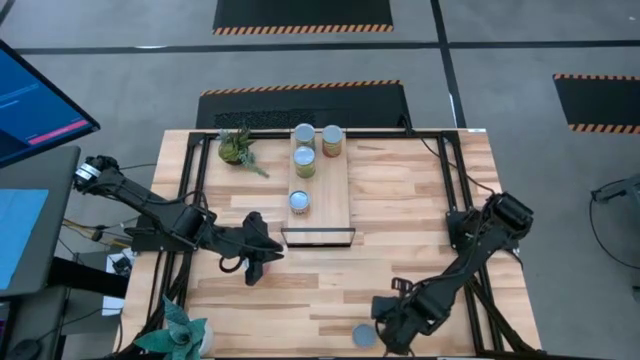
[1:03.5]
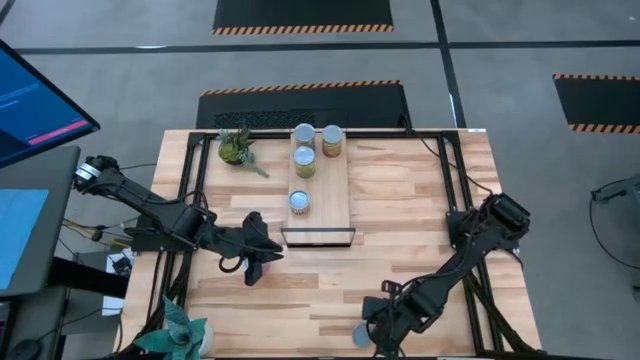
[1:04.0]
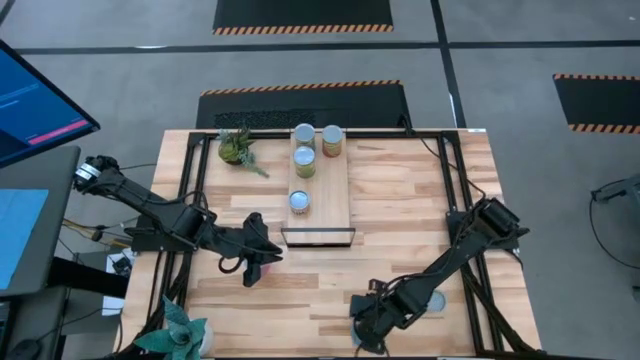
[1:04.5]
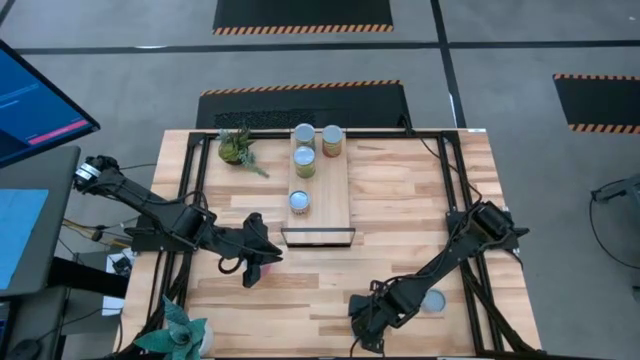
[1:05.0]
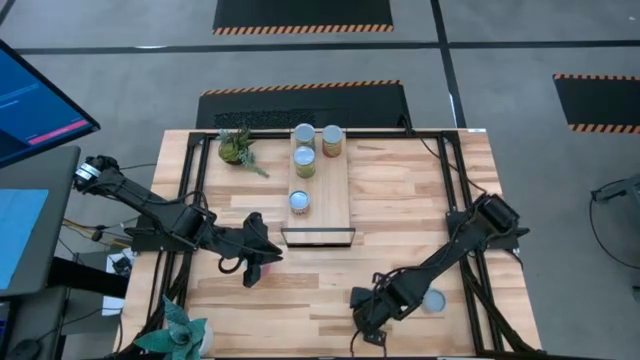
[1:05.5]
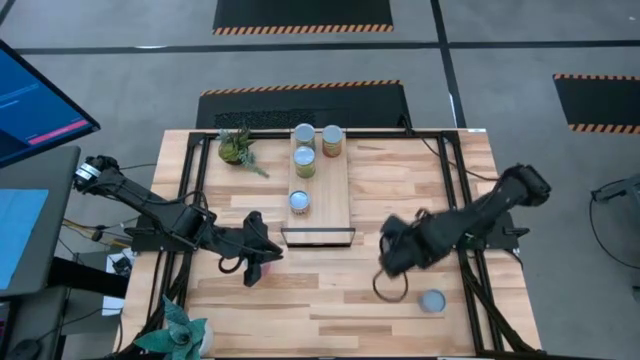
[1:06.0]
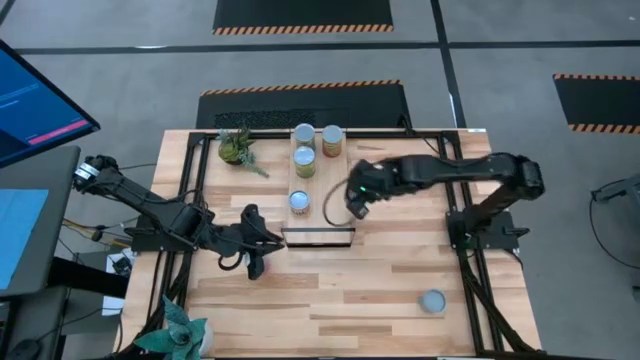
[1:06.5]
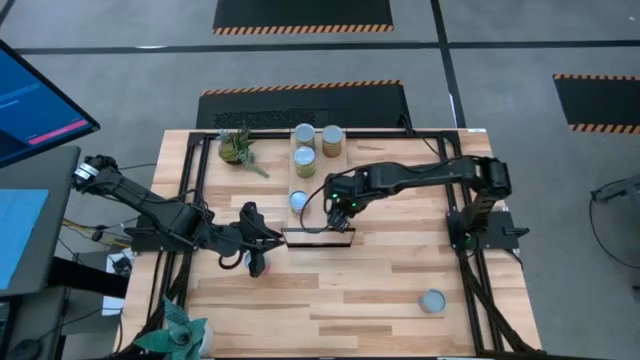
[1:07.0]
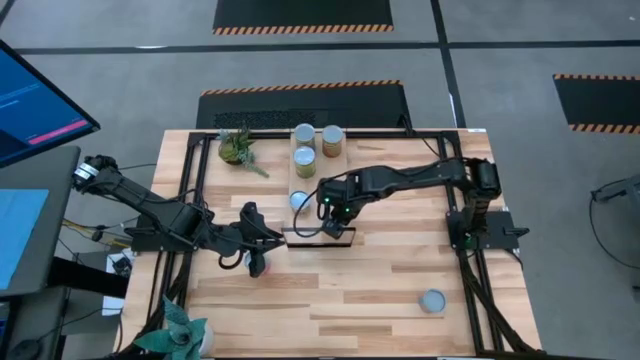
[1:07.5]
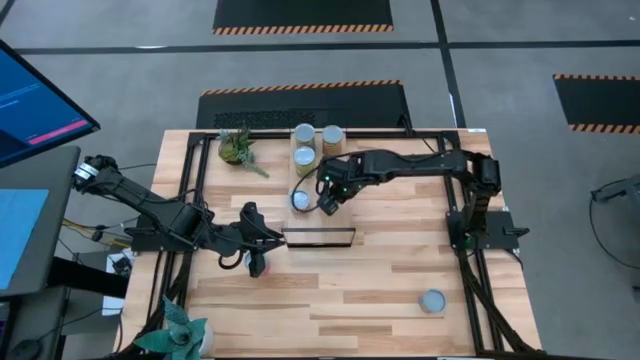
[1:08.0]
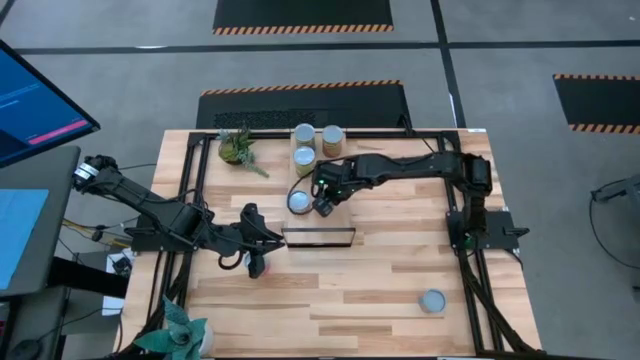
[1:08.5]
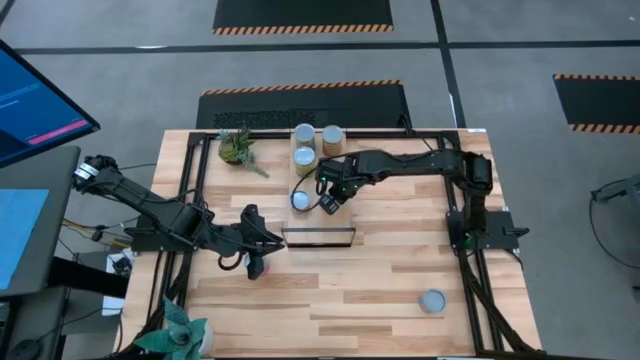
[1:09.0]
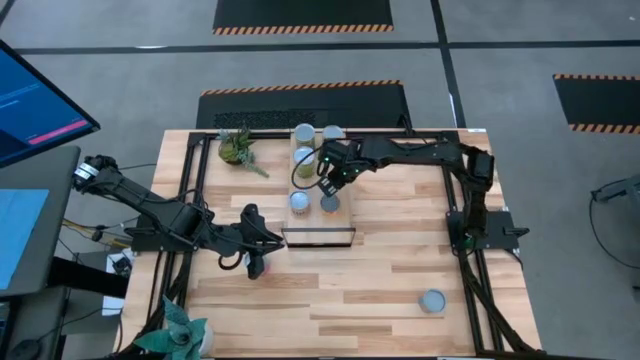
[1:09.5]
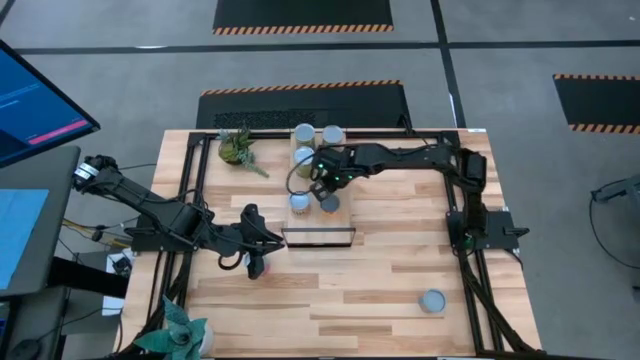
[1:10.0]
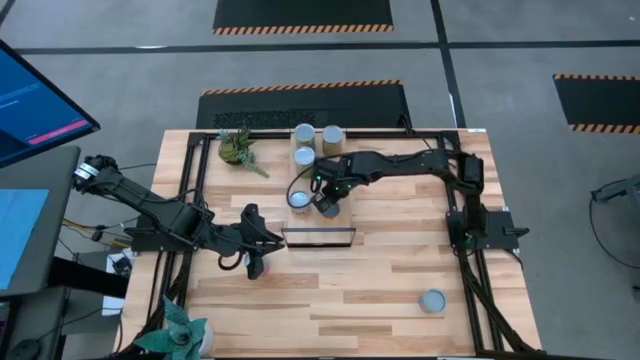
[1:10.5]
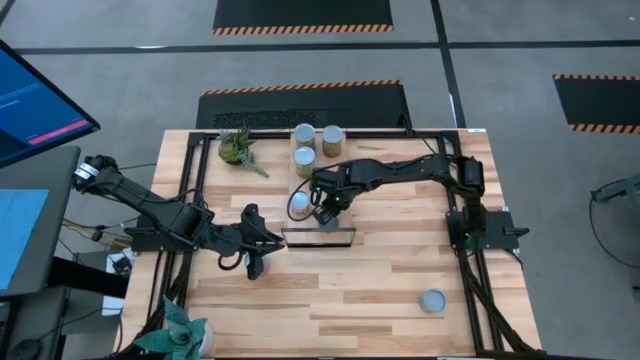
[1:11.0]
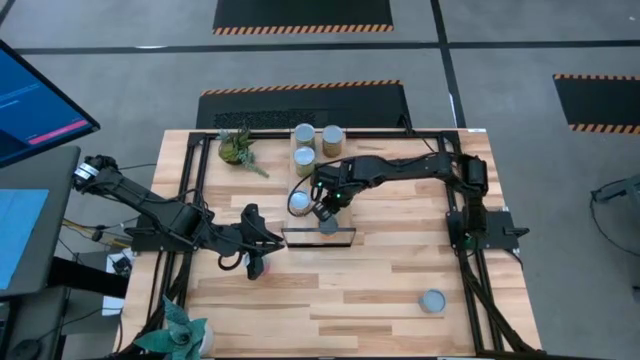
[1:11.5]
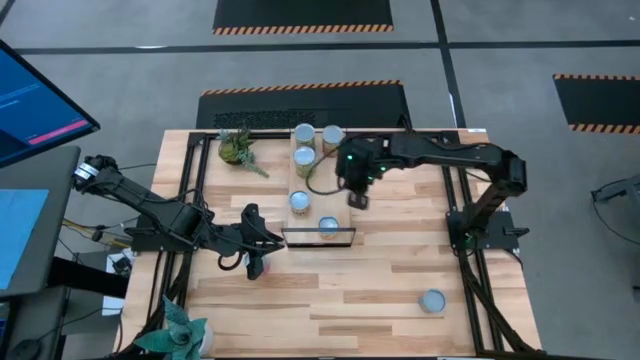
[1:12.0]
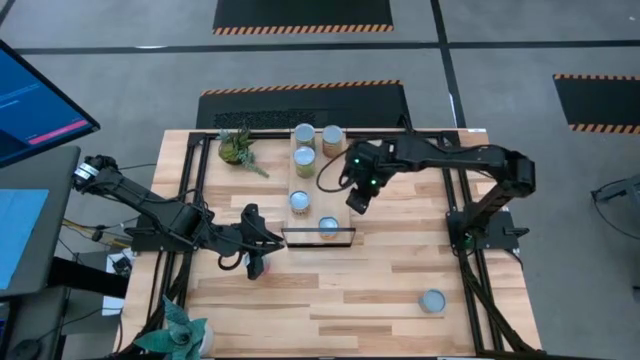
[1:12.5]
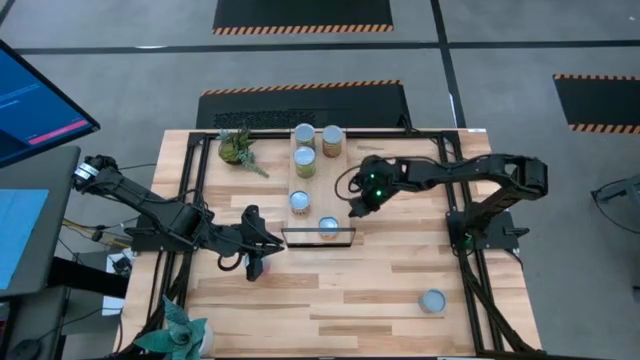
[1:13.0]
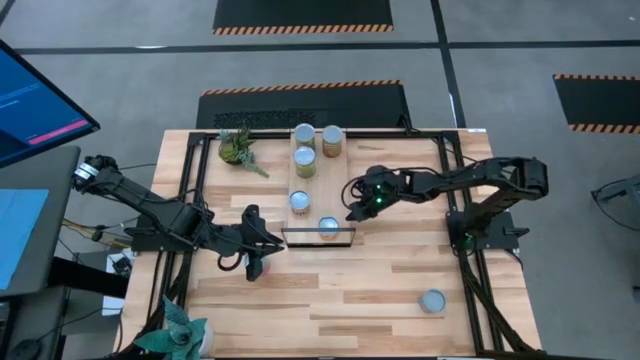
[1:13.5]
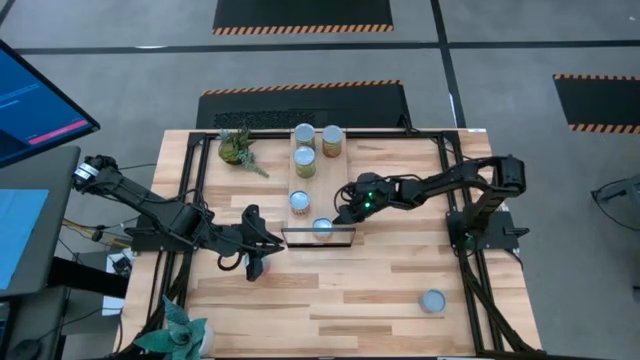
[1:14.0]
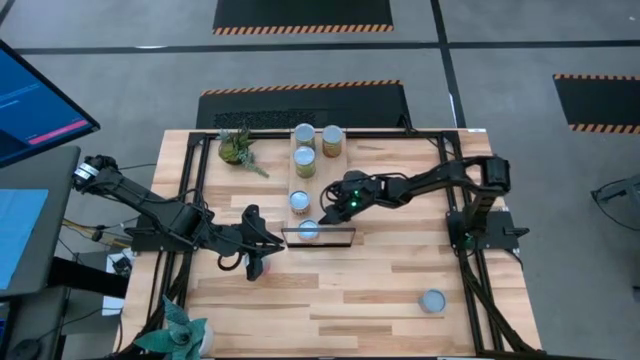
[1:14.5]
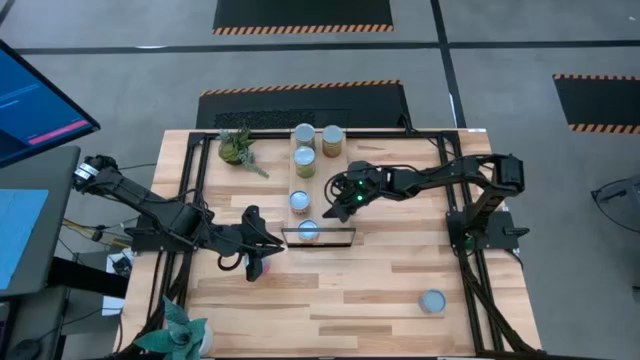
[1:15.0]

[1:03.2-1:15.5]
Task: Pick and place cans onto a shelf
Put the canned pineapple ring on the shelf

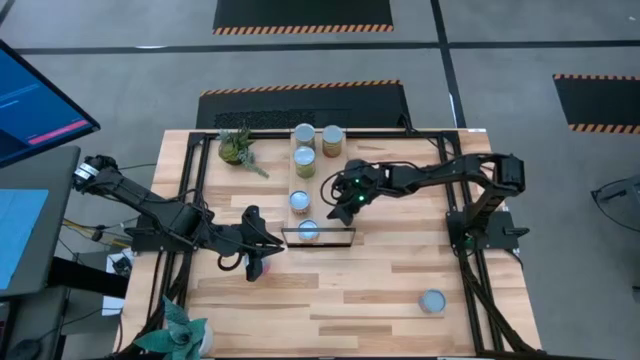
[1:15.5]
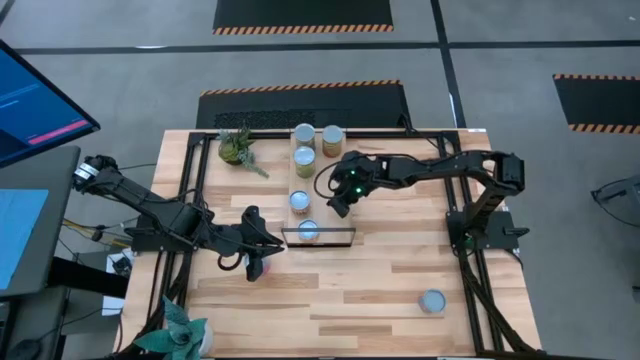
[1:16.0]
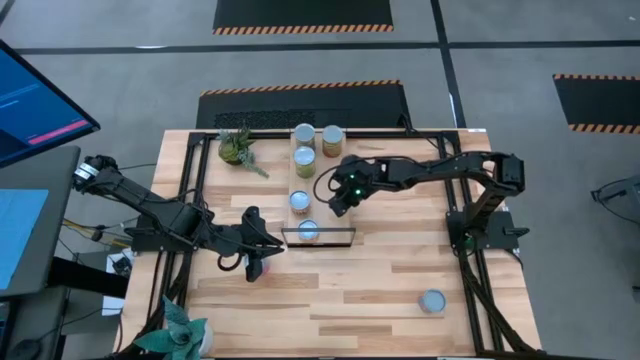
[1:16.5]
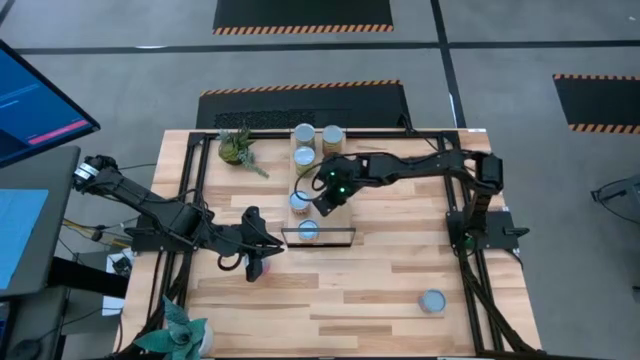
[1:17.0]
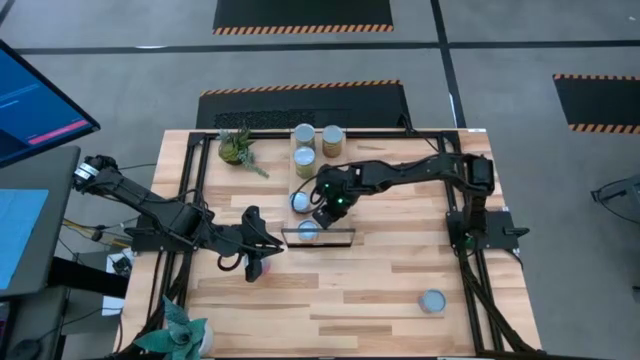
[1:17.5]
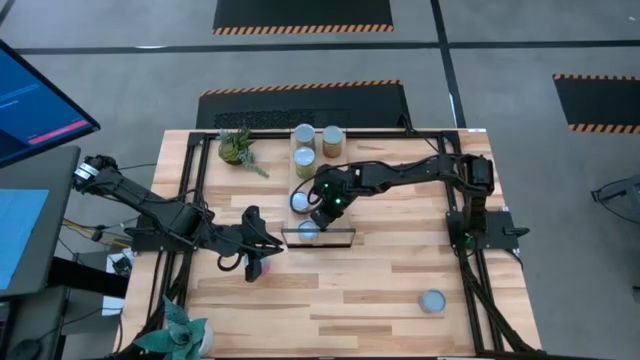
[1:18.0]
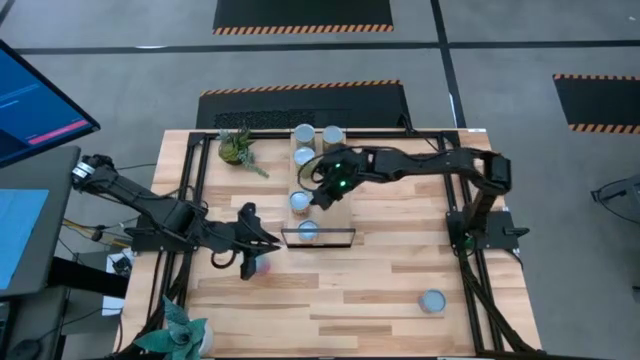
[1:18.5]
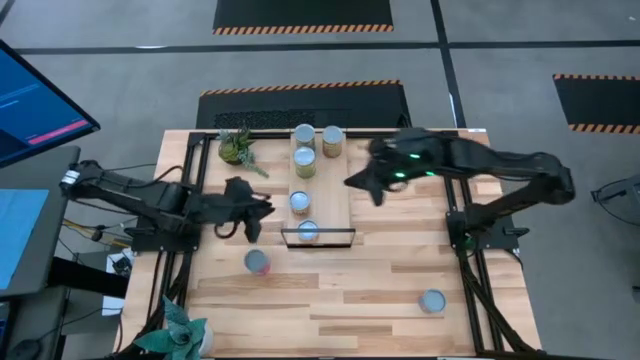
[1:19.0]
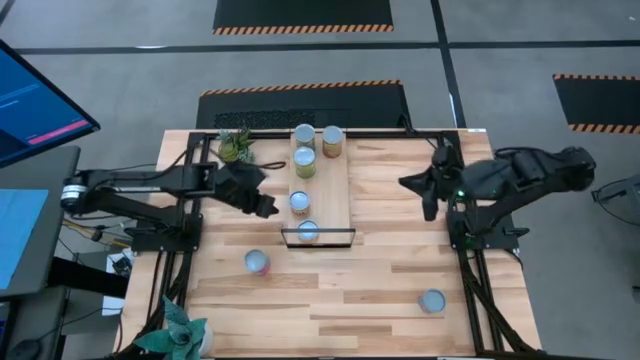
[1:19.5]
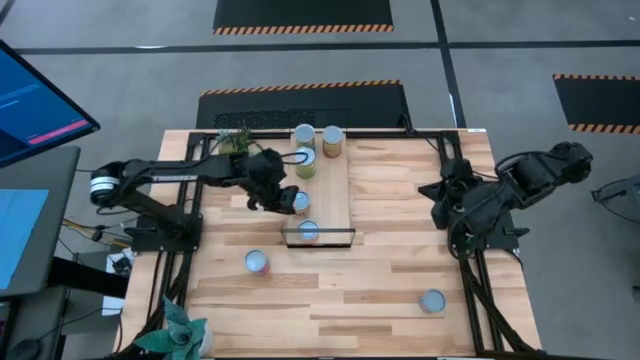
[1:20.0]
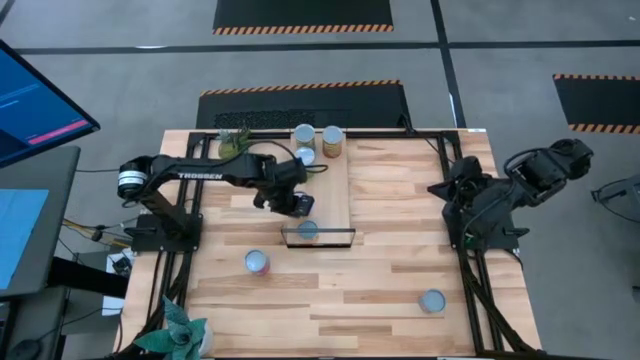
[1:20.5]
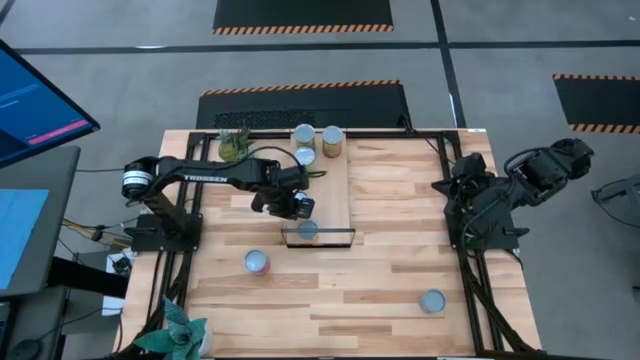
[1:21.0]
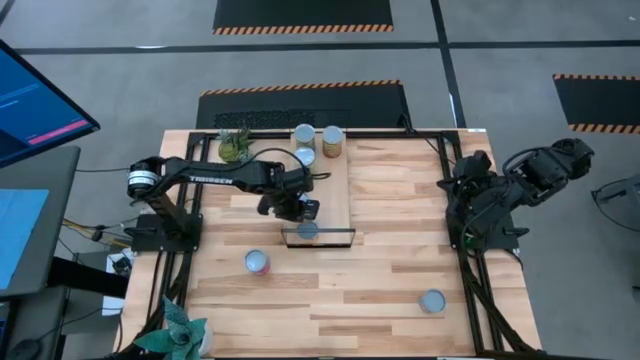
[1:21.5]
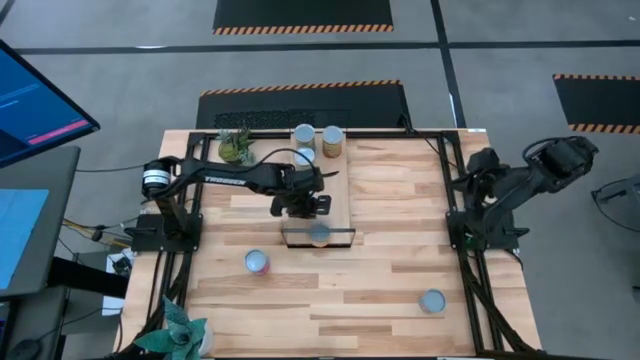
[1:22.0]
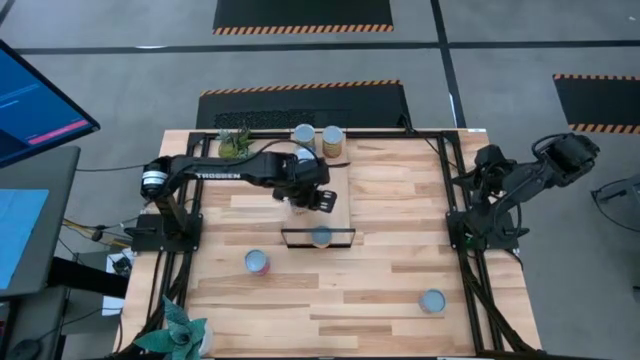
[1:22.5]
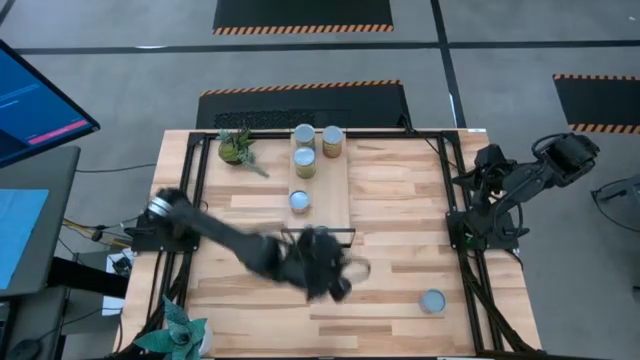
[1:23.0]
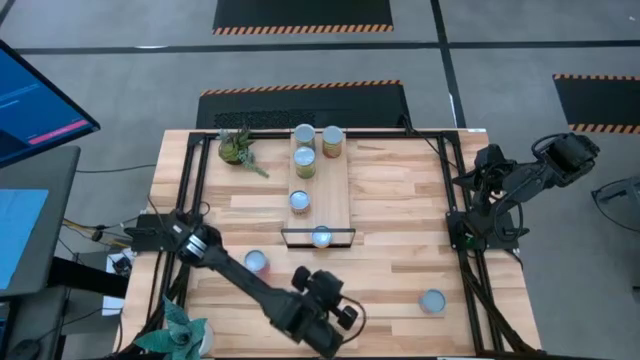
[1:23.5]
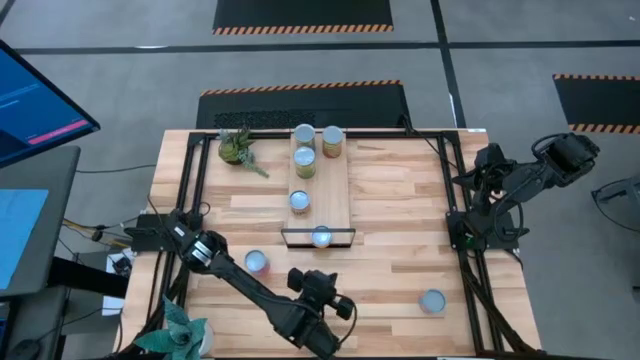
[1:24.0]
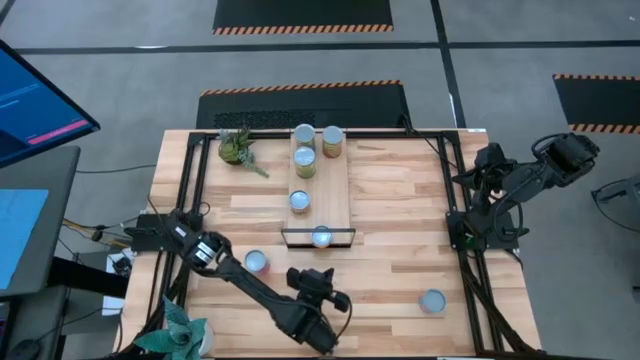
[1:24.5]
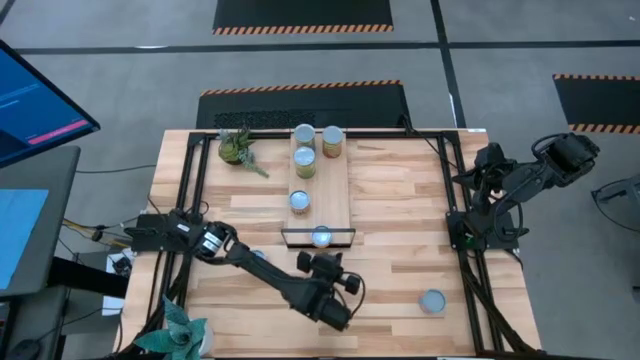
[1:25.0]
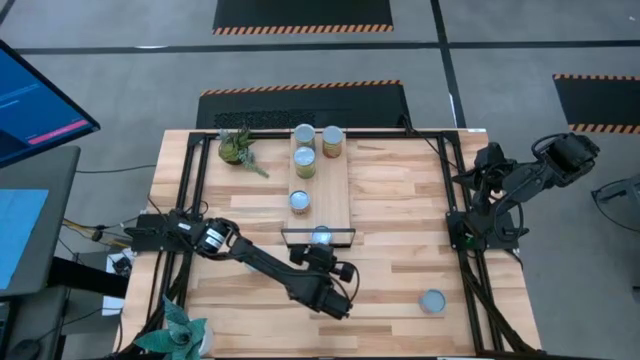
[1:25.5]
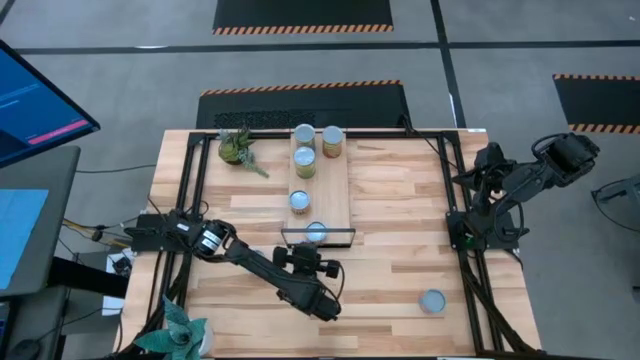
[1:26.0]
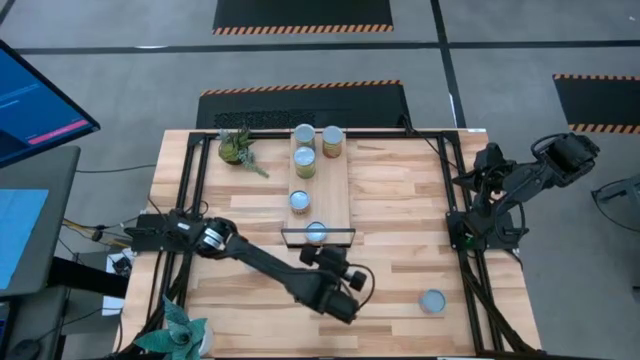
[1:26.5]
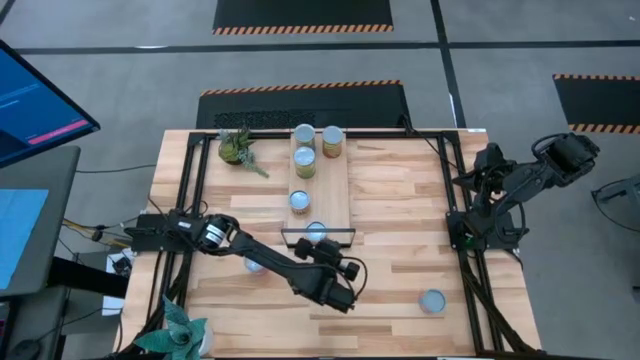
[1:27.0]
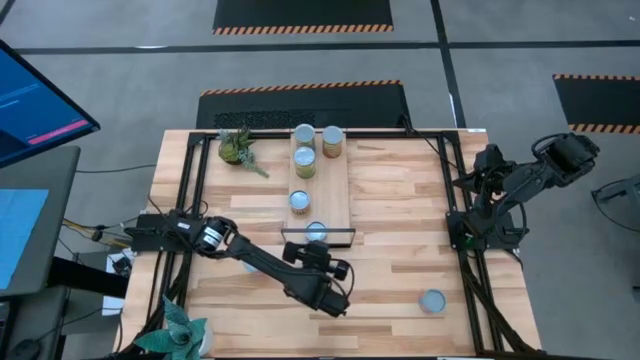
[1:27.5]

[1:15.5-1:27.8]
Put the canned pineapple ring on the shelf
